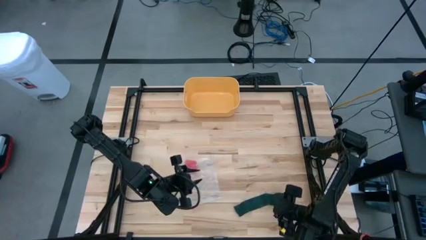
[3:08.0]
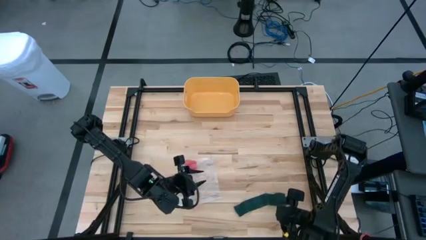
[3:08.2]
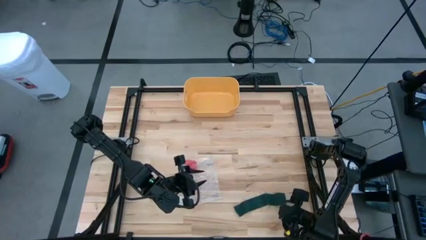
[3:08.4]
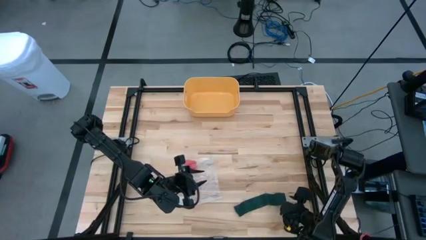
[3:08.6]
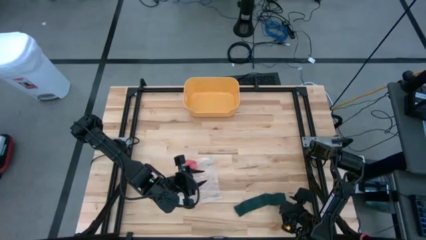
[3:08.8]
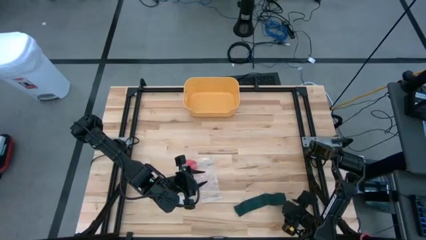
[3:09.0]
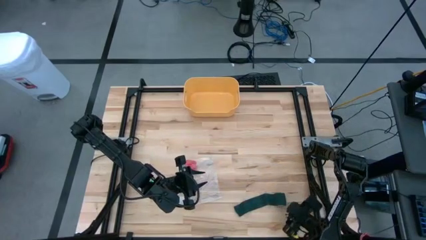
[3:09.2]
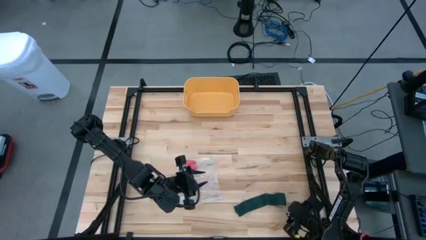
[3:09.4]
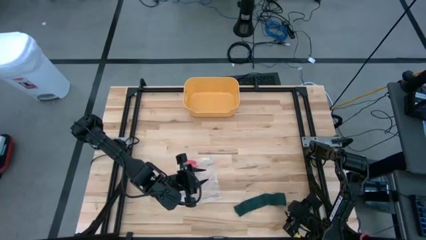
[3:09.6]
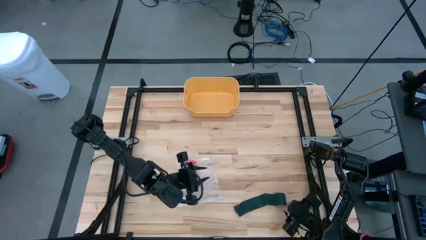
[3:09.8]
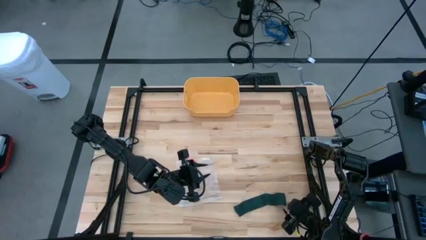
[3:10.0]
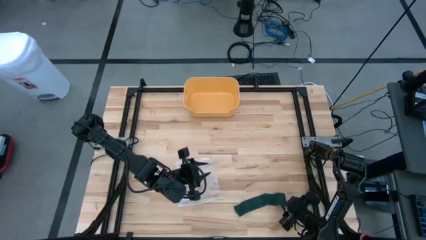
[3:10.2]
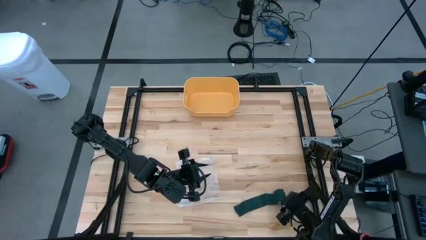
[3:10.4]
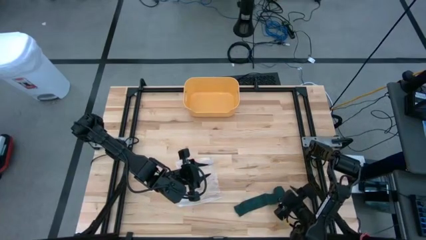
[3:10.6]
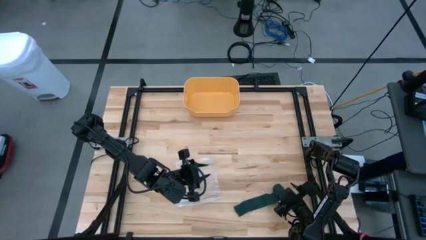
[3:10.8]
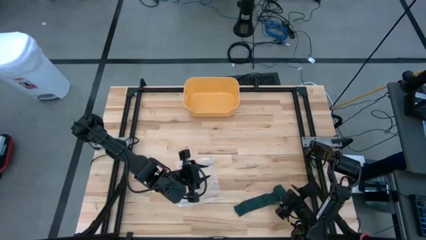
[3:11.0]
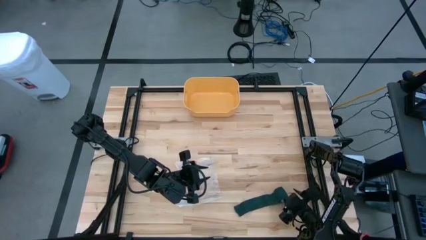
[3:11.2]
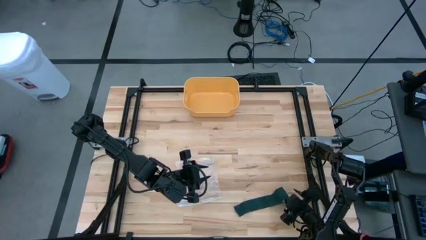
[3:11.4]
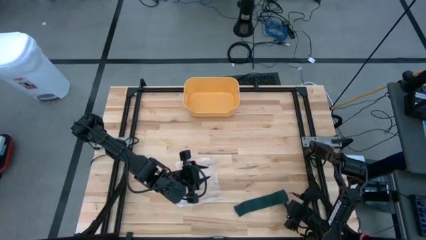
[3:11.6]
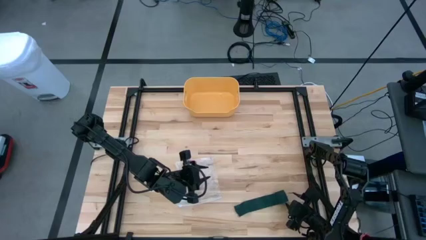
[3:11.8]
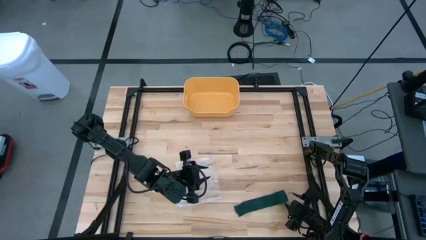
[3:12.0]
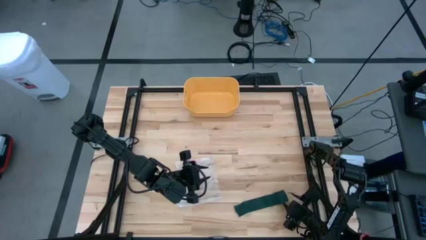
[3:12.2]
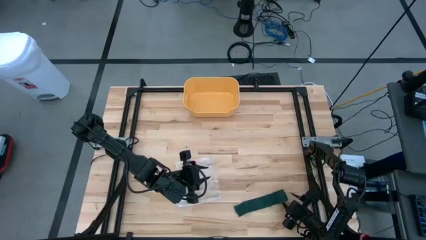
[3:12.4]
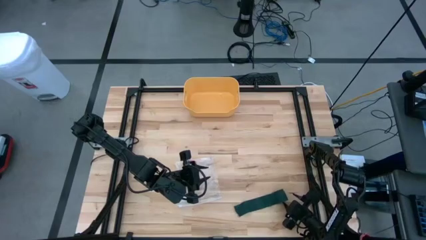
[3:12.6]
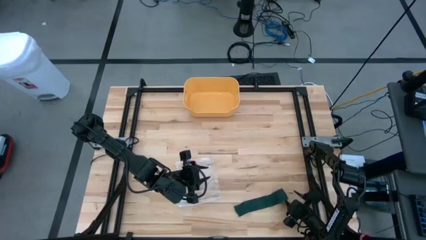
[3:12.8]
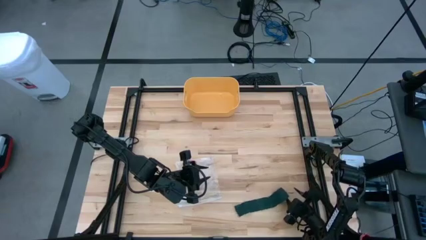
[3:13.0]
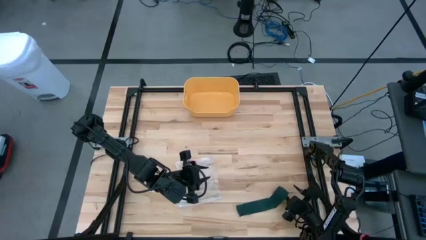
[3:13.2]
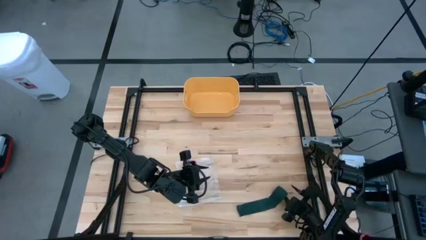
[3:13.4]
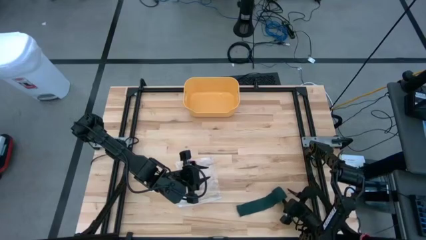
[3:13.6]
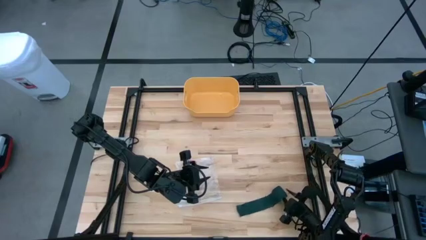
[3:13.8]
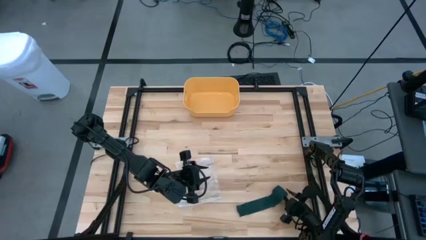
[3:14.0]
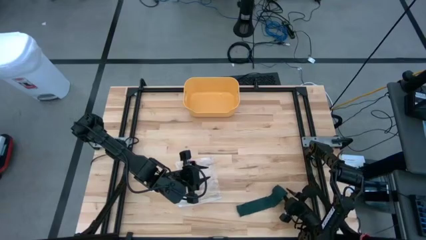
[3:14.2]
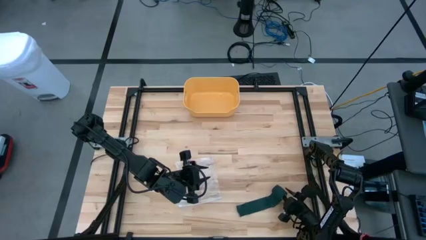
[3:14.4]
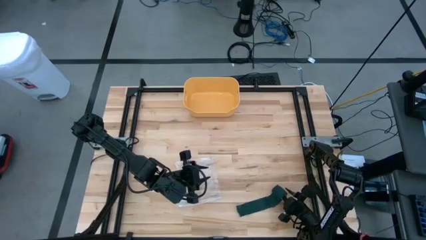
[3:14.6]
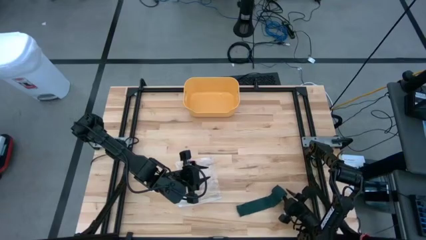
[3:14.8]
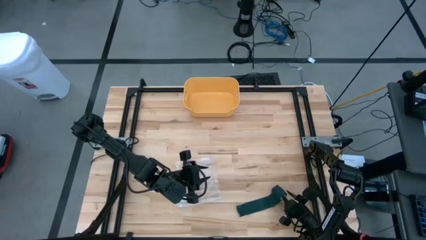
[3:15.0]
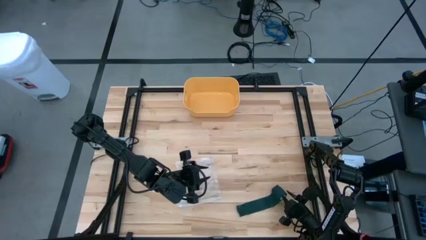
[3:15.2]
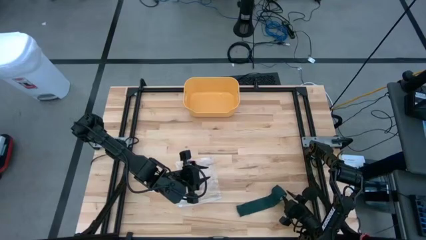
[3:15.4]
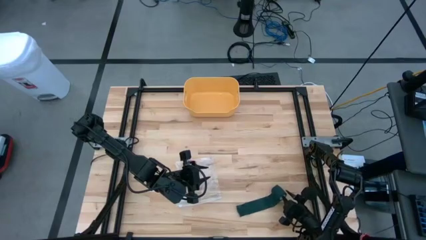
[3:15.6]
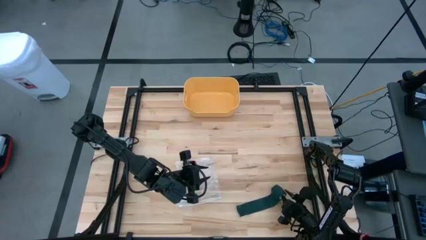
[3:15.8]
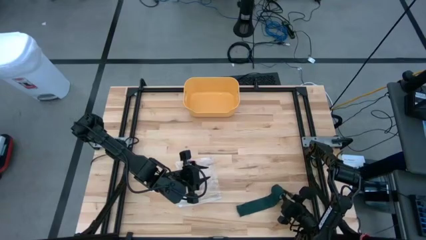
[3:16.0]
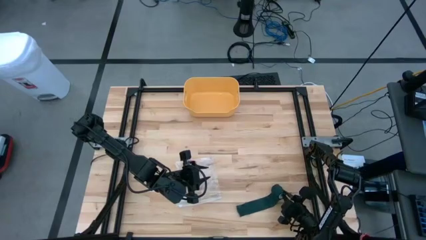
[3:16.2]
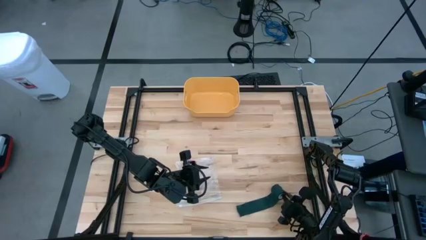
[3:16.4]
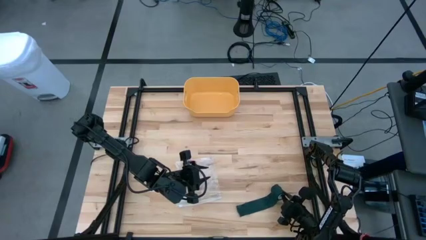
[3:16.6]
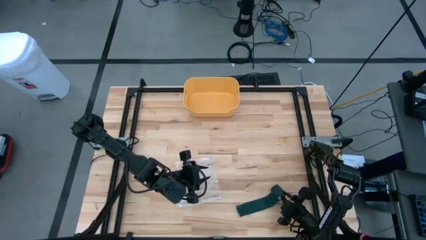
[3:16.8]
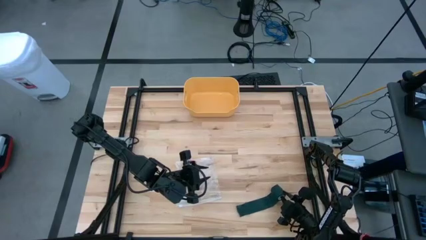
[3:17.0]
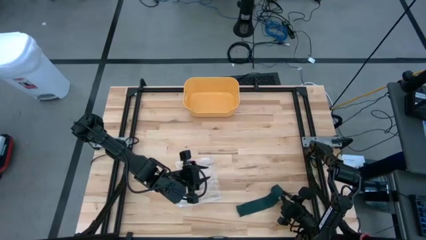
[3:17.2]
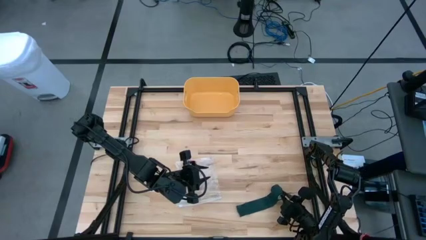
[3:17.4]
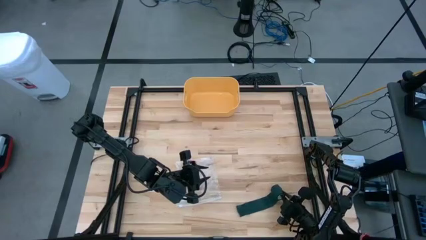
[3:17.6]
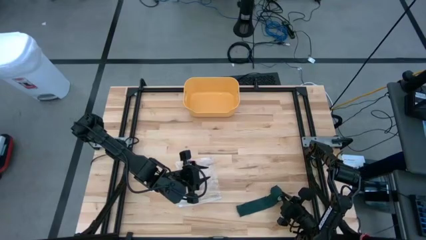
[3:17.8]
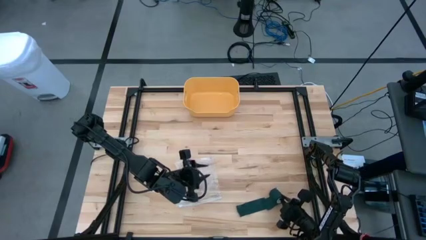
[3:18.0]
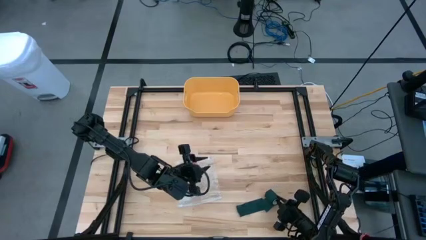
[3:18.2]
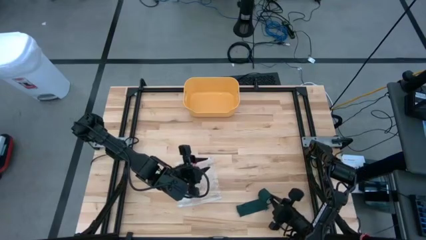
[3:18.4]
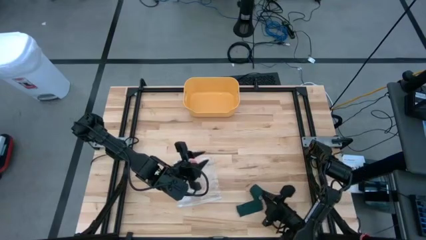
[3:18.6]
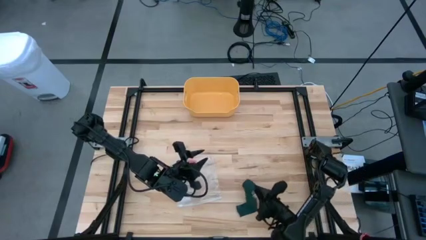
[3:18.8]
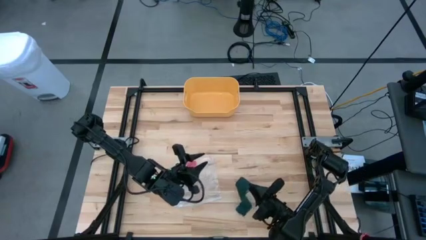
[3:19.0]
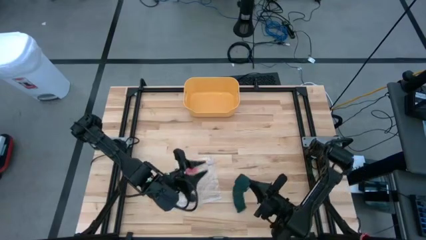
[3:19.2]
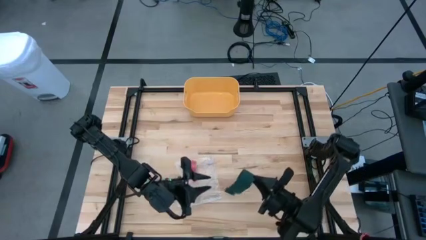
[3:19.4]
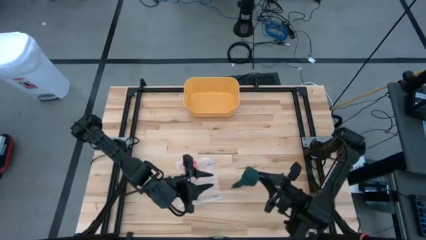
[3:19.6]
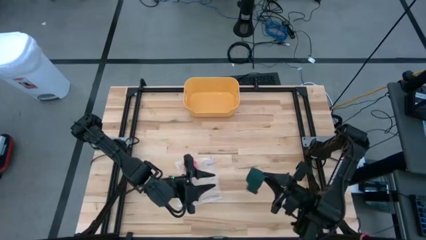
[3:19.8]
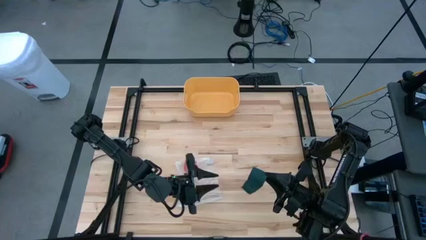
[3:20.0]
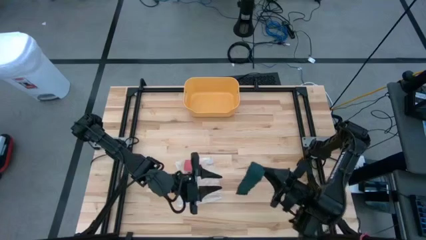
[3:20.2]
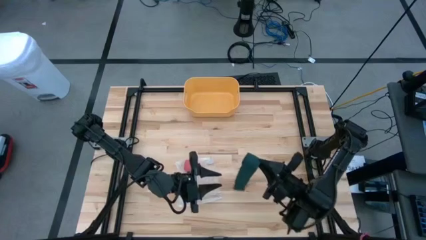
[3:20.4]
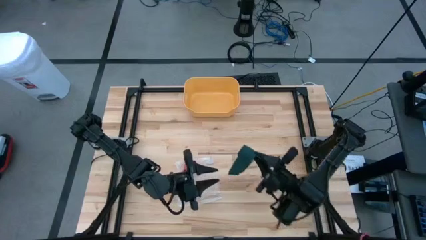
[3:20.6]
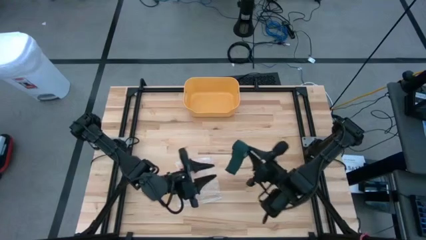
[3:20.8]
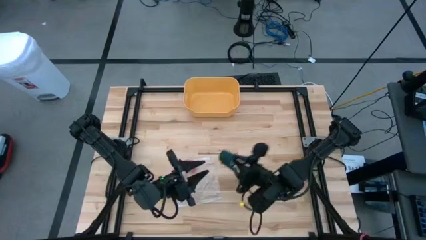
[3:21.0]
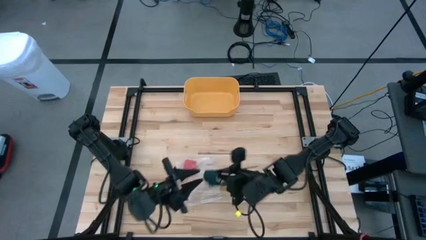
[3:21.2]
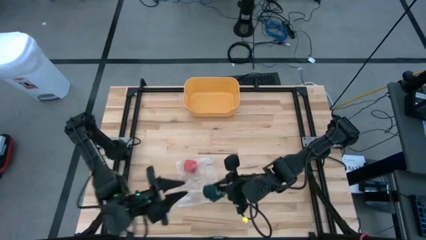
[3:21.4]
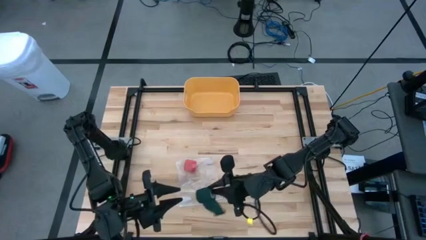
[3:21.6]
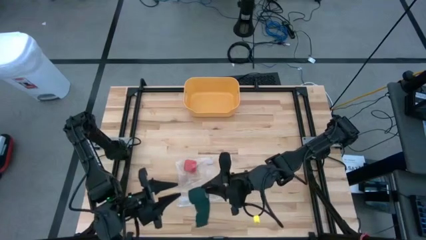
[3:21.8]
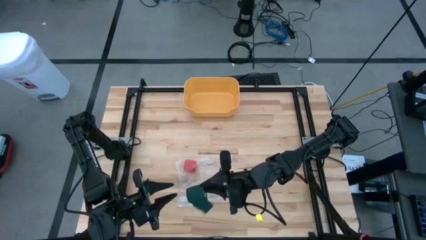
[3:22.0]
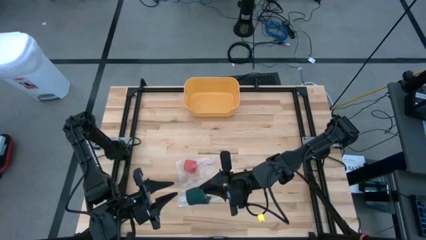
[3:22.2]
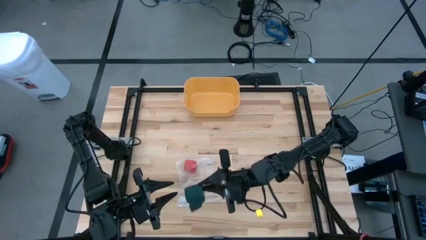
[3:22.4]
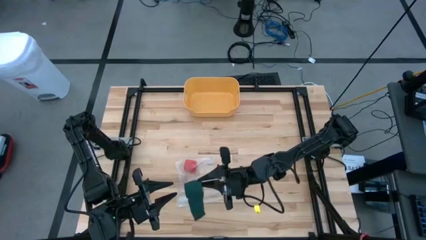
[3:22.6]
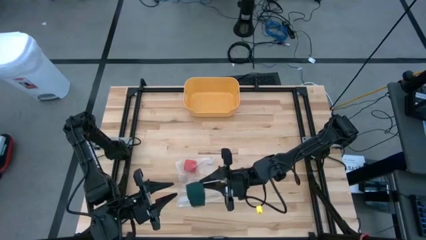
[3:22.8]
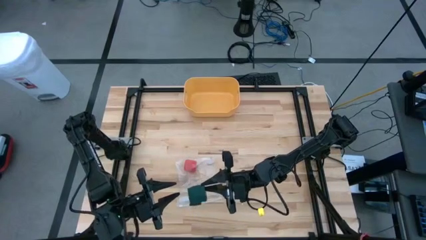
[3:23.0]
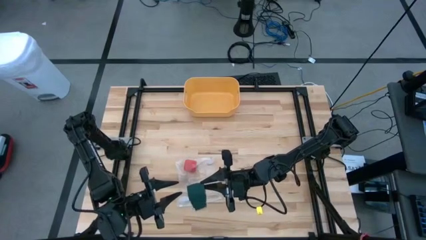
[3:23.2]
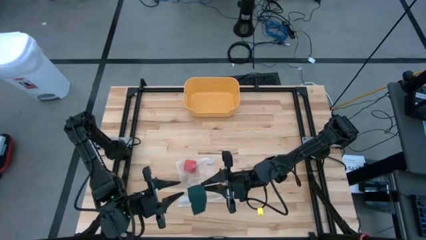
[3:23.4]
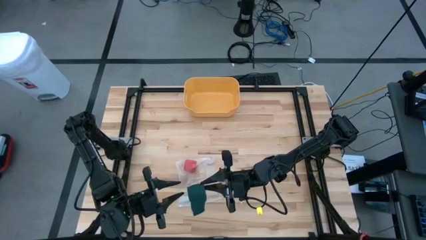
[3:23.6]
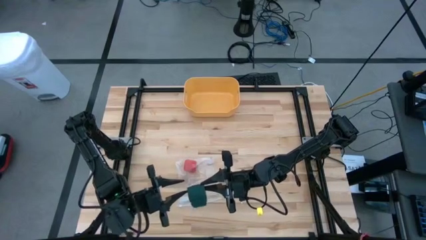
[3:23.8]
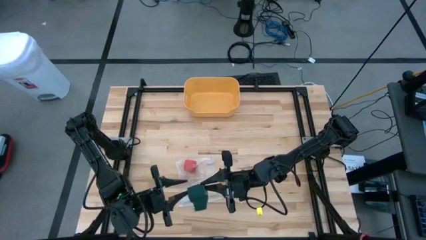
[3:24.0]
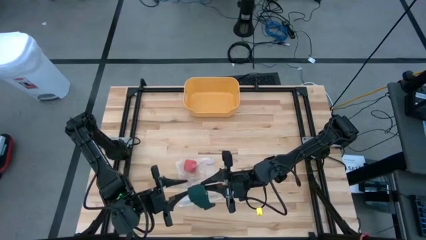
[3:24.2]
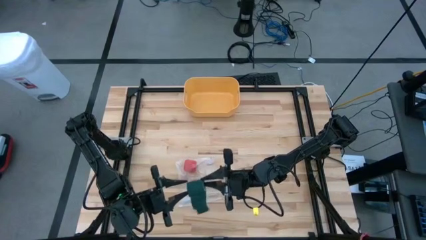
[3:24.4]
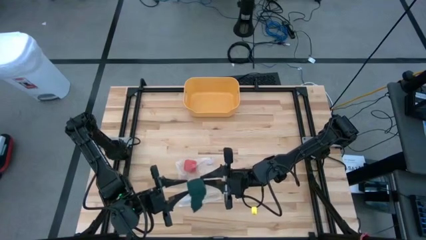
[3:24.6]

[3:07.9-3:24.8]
Task: Roll bandage
Roll the green bandage

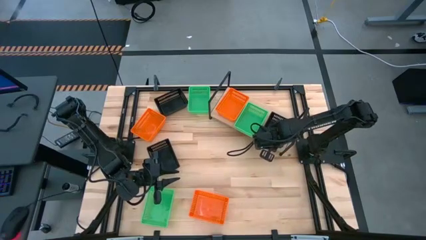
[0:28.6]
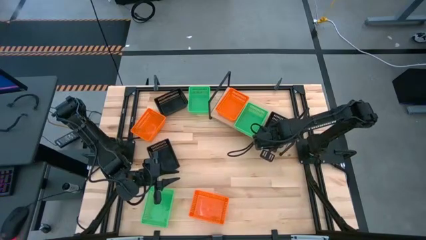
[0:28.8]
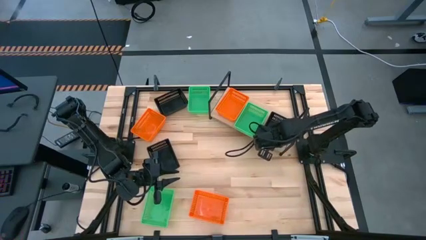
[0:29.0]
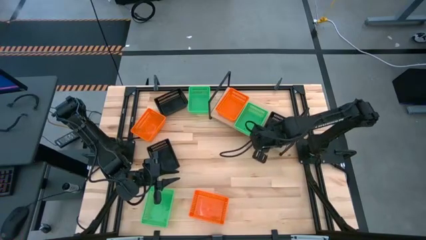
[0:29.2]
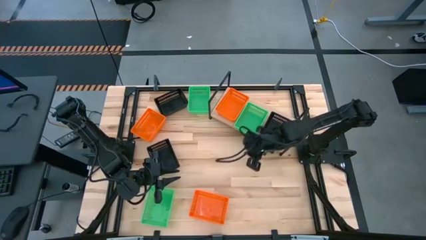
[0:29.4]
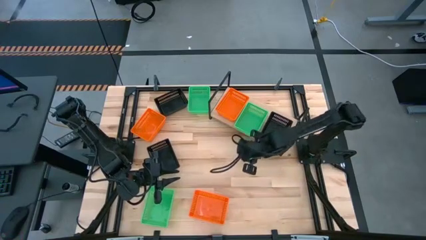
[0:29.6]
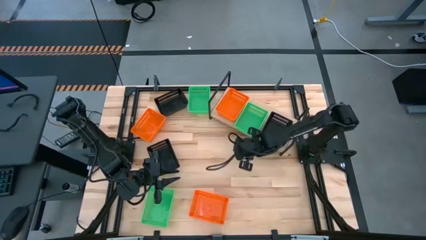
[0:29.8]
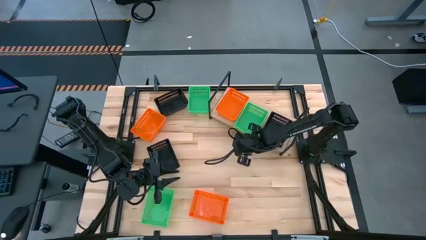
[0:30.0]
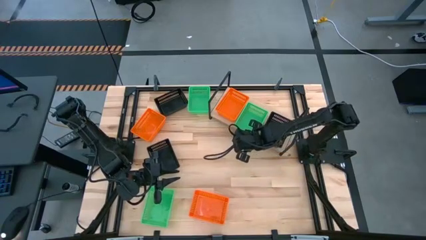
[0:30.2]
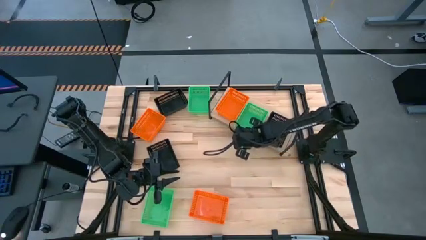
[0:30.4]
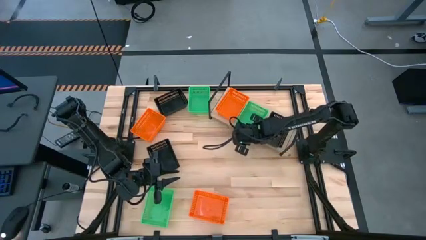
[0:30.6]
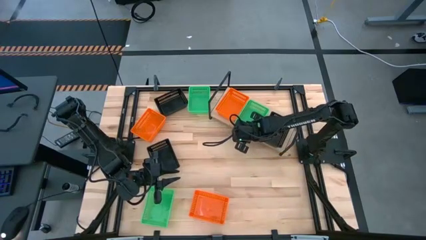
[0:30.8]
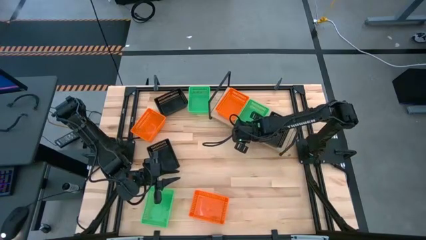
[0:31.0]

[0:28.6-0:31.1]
Task: Stack baskets on shelf by color
Adjust the green basket on the shelf
